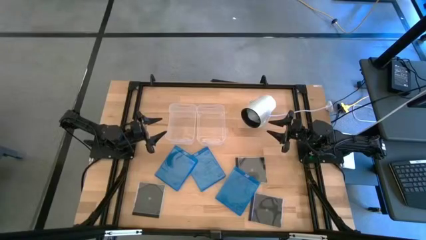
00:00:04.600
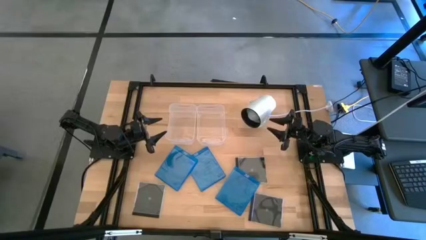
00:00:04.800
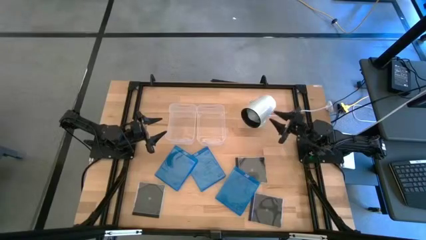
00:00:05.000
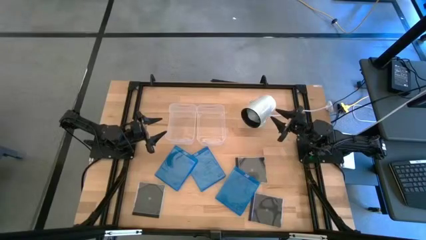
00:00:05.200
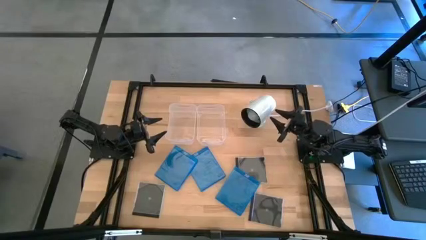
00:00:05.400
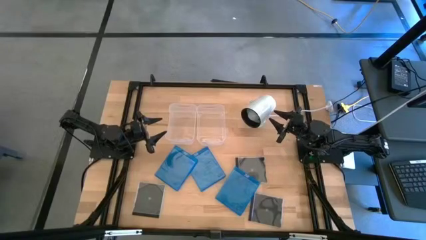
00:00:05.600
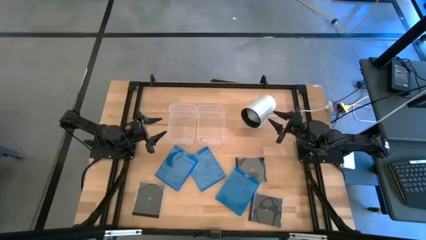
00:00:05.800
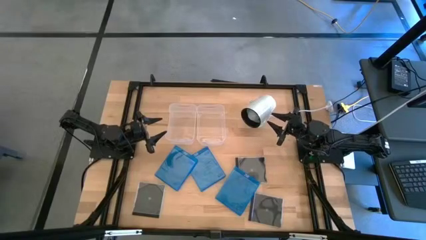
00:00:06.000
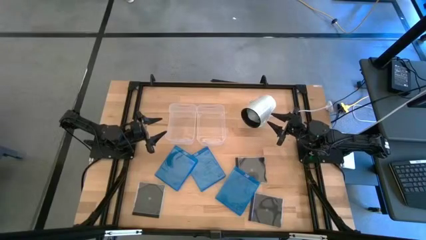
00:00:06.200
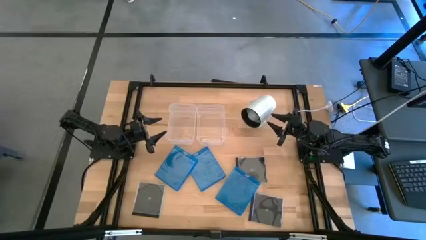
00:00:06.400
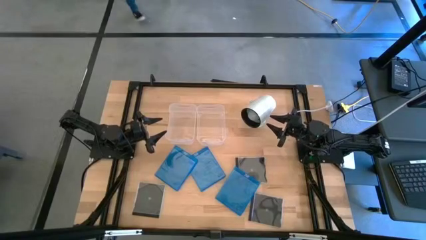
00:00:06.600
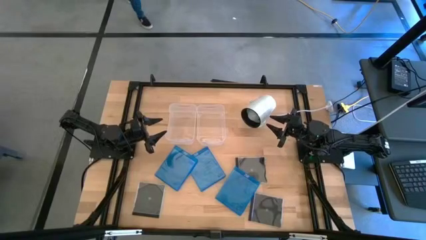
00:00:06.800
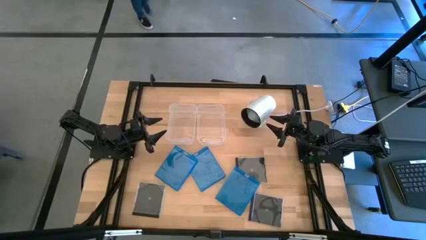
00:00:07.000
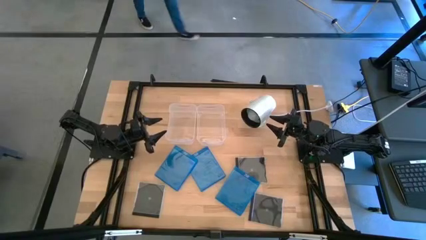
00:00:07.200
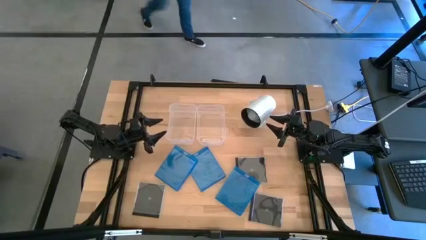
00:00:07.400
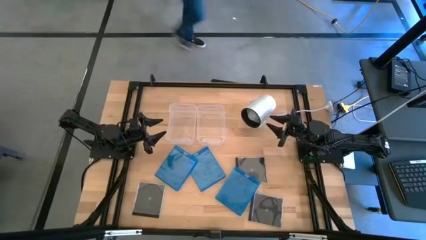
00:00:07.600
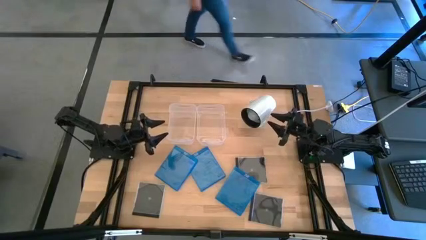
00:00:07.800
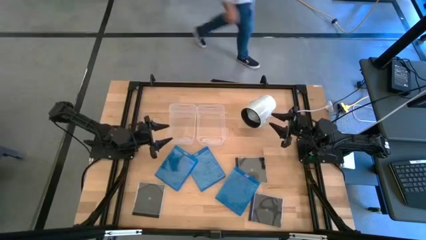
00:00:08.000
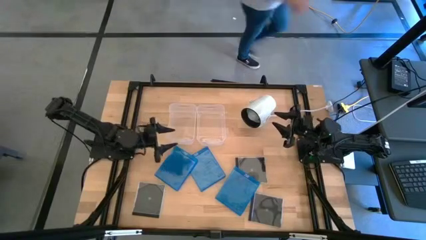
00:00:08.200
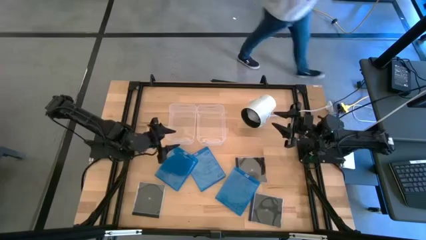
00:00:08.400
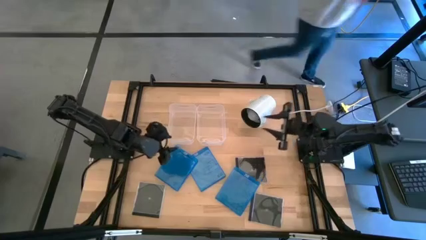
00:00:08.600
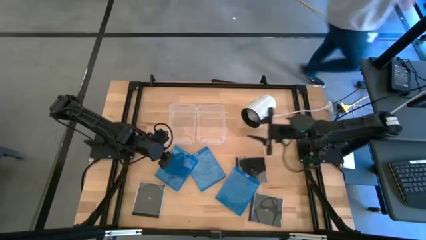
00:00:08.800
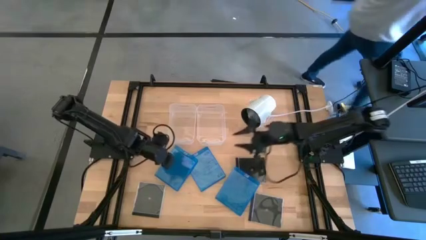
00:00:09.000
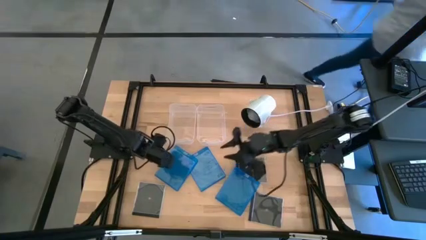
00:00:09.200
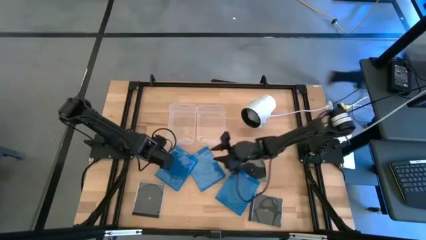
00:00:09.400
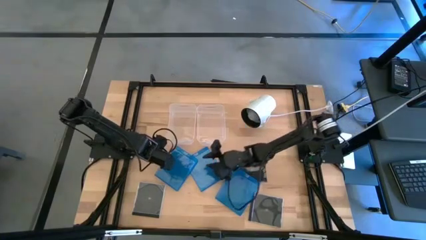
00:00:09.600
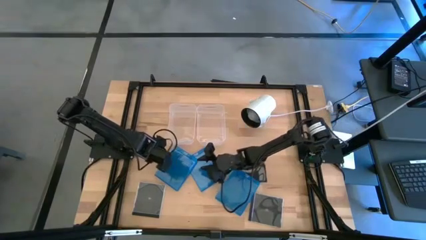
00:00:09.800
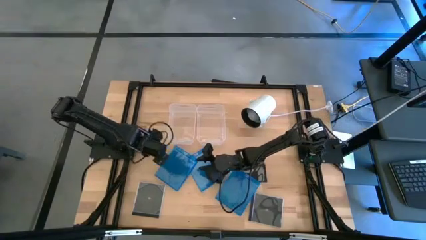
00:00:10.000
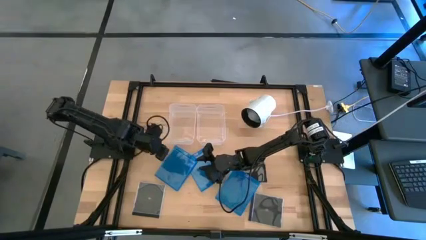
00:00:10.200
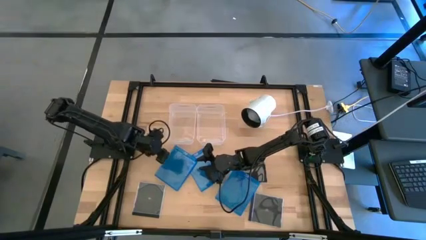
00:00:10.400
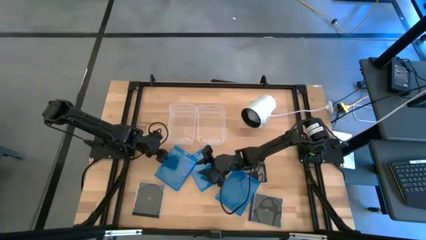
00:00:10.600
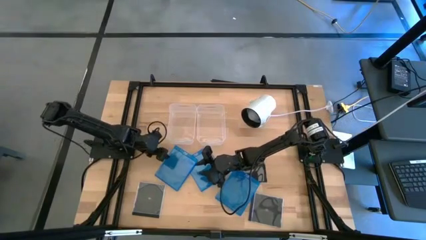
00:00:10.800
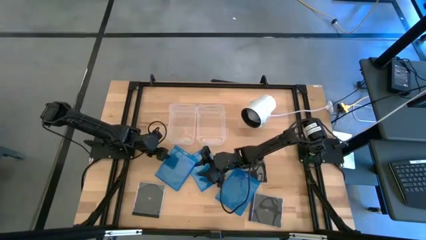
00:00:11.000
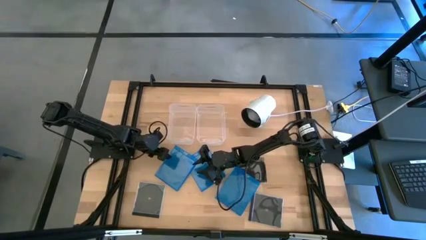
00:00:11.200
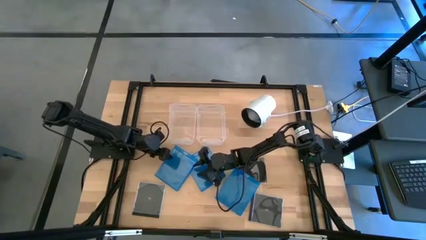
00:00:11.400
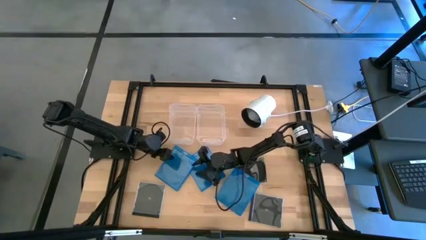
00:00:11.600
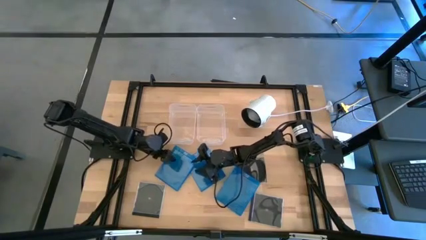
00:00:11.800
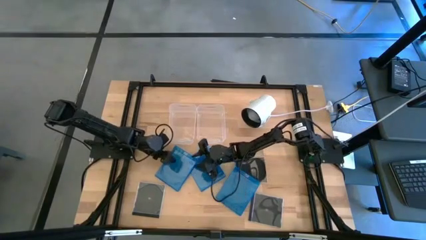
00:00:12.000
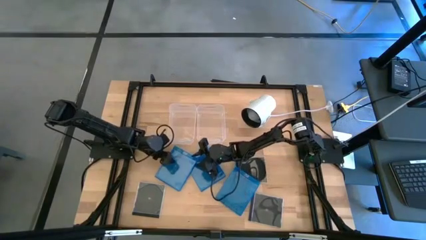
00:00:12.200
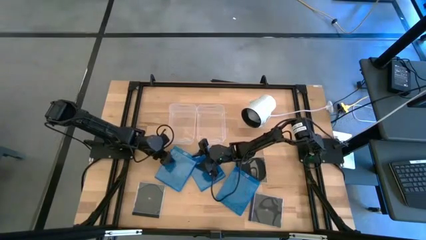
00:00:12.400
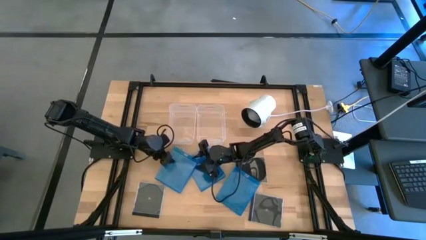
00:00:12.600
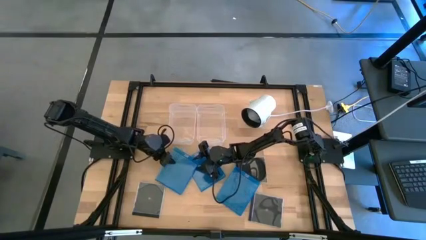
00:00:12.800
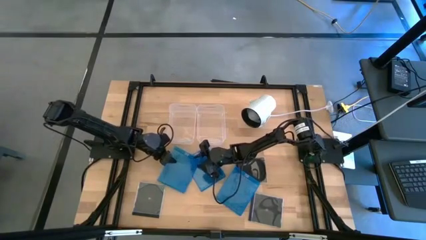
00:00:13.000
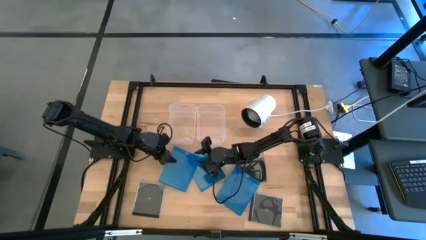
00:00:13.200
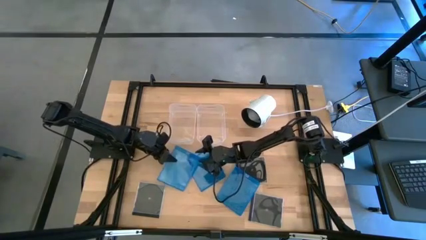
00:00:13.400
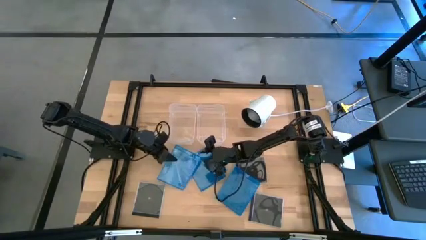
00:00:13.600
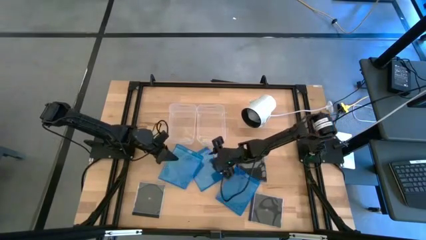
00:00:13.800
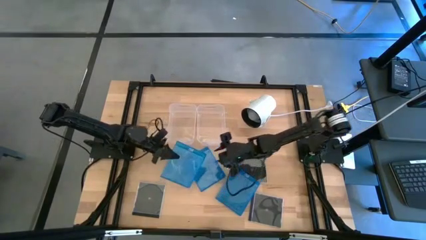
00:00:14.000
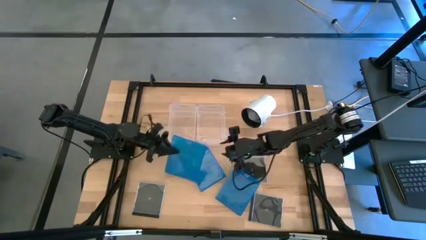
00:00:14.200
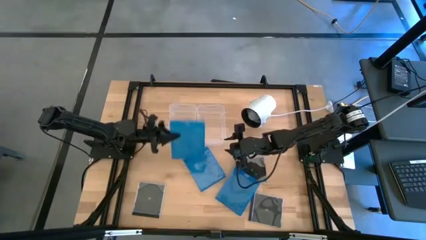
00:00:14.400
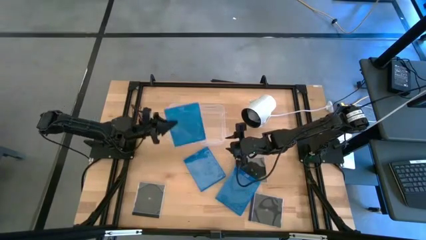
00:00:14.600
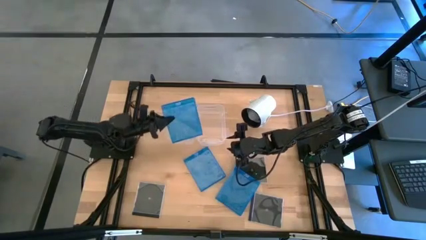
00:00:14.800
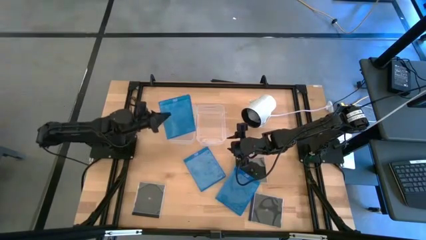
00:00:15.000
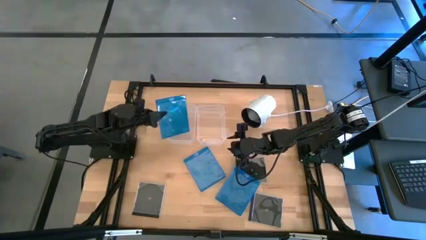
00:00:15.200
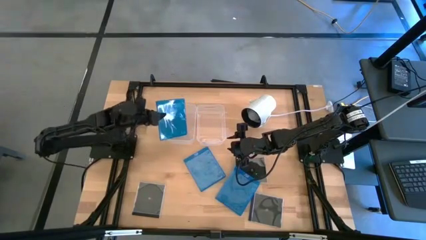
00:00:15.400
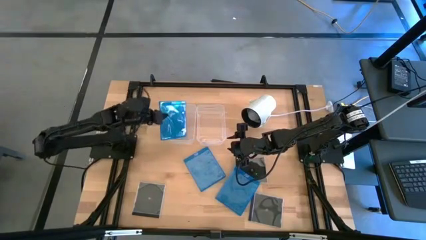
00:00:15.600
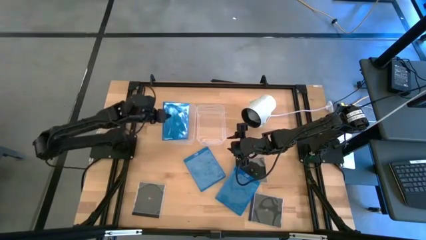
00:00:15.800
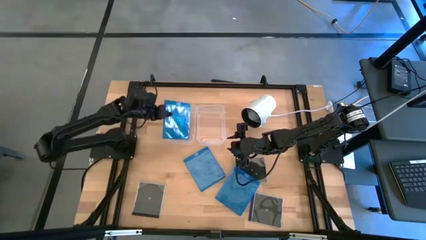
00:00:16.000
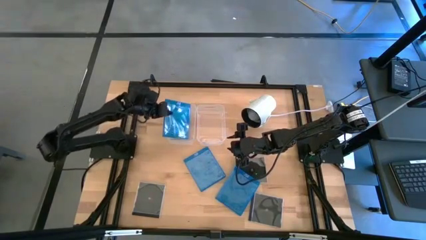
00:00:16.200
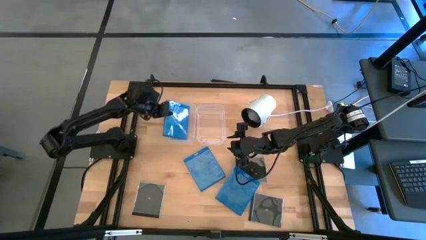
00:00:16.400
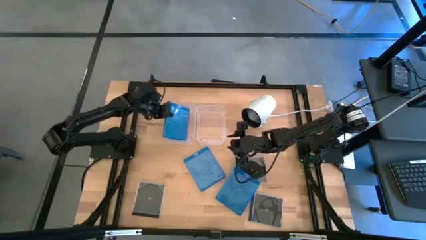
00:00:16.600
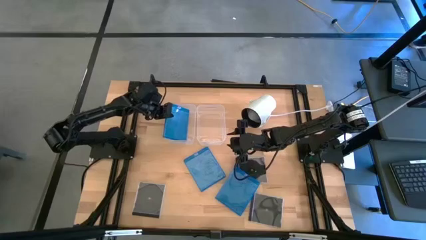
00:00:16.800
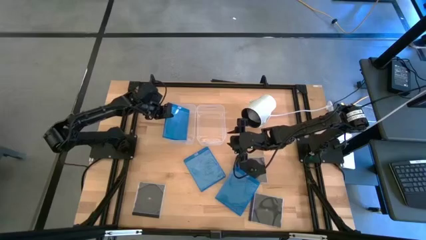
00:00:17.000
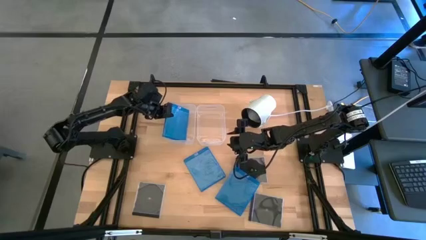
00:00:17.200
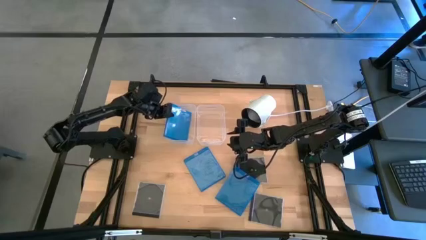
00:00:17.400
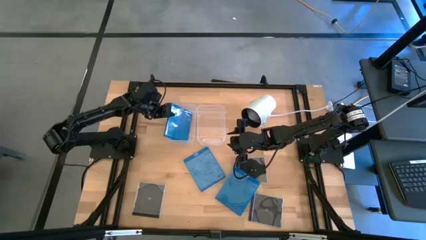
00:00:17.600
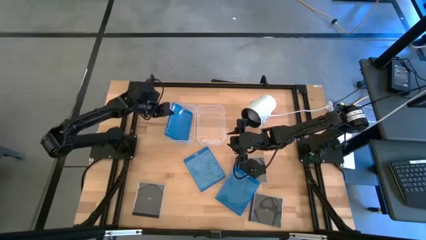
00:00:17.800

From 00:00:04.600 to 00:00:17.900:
Task: Pick & place jewel cases by type
Put the top left blue cd case into the left transparent bin

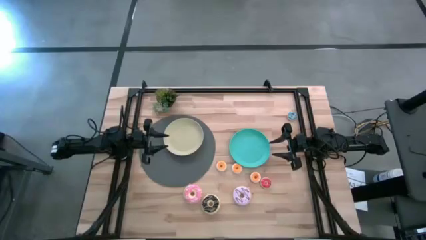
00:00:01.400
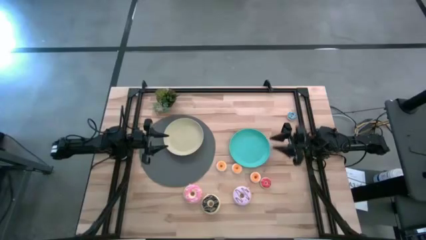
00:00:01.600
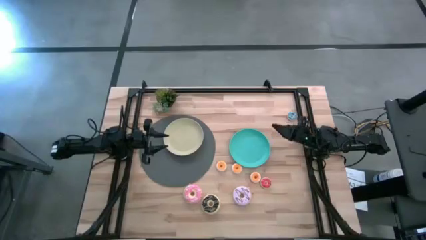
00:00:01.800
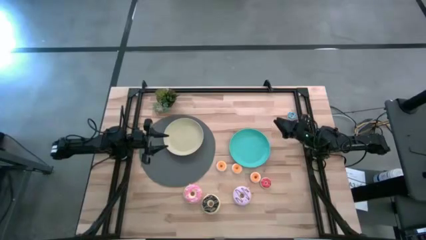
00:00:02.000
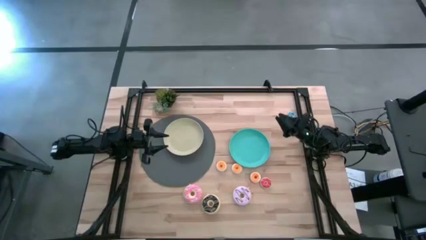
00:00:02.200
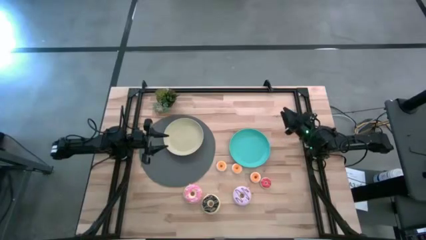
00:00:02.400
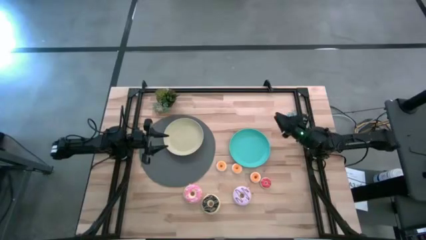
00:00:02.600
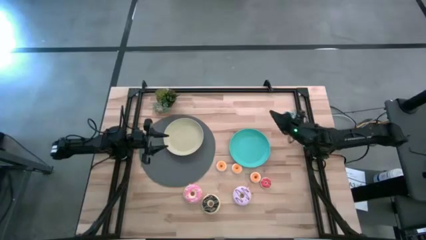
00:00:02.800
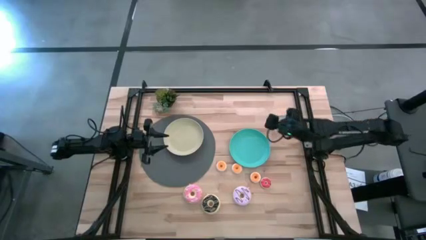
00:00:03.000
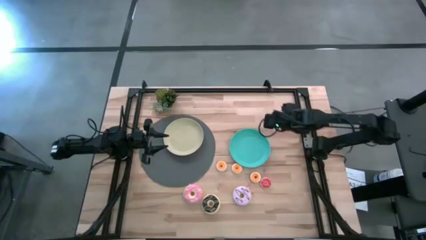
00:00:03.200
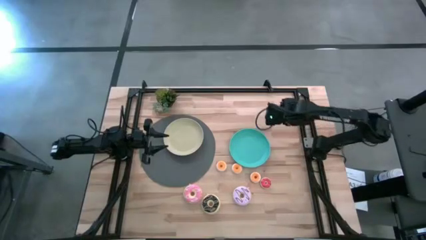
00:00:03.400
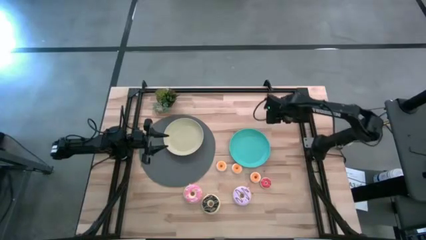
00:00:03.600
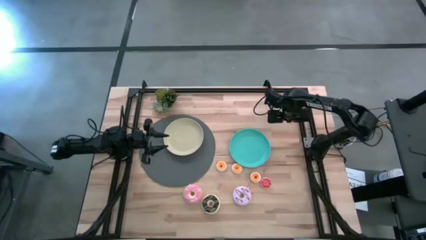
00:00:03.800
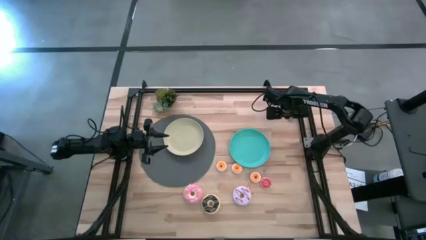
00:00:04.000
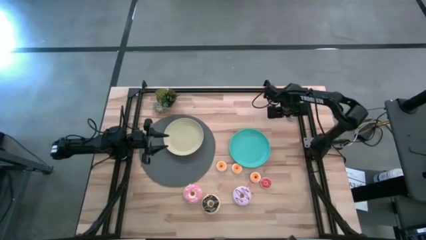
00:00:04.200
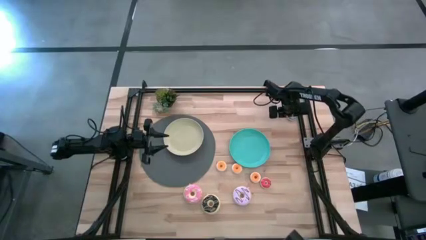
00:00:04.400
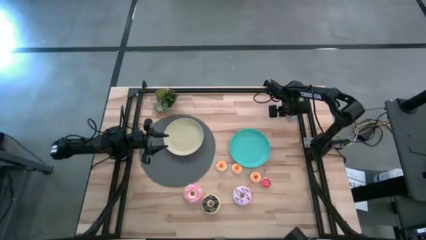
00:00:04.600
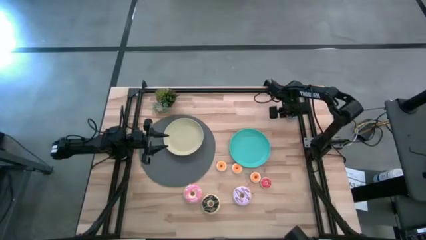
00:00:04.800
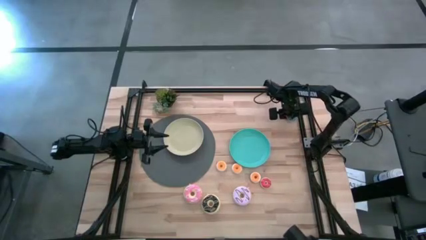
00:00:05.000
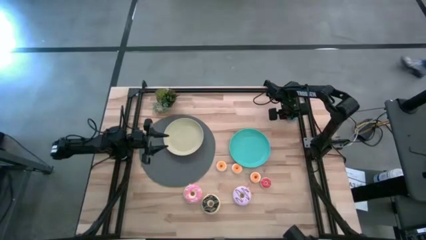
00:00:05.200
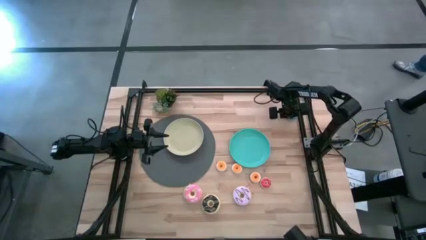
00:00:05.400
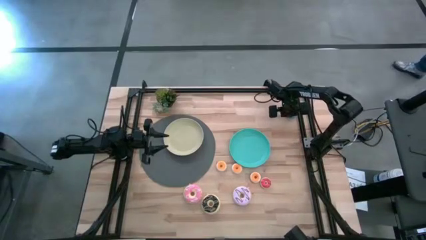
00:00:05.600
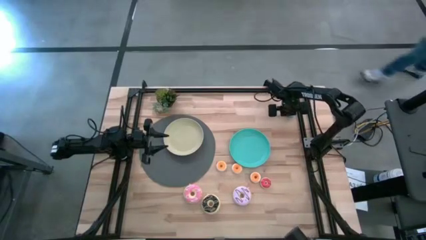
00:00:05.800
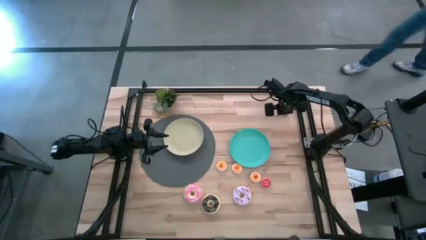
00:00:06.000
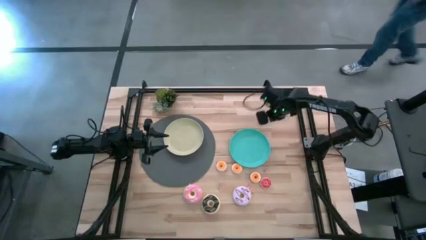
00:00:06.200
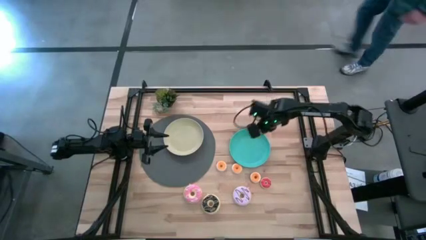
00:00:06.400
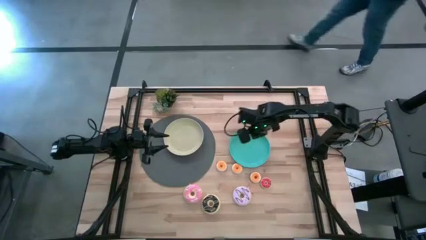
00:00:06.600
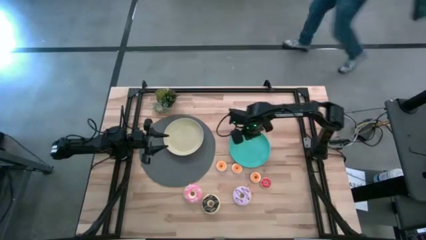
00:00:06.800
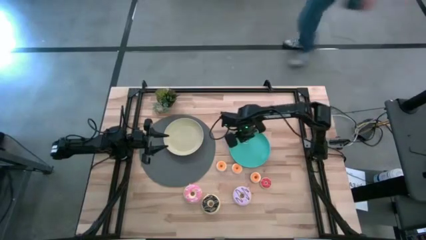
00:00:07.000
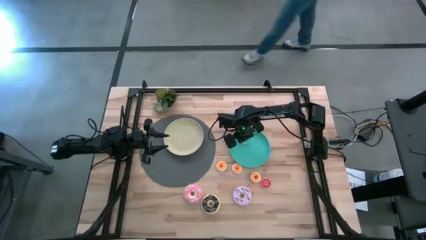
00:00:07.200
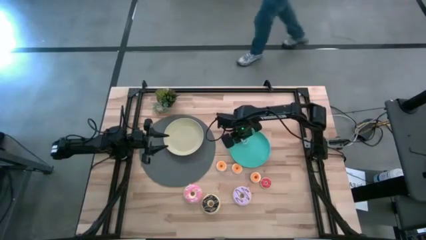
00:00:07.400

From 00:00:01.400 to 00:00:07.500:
Task: Pick & Place donuts
Put the small blue donut on the light blue plate
